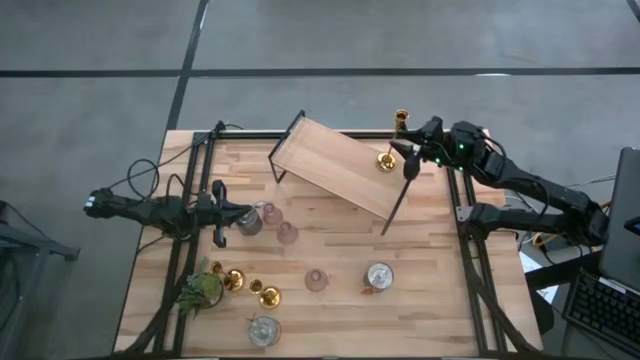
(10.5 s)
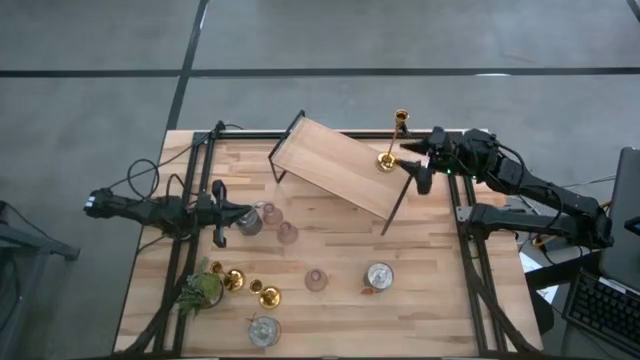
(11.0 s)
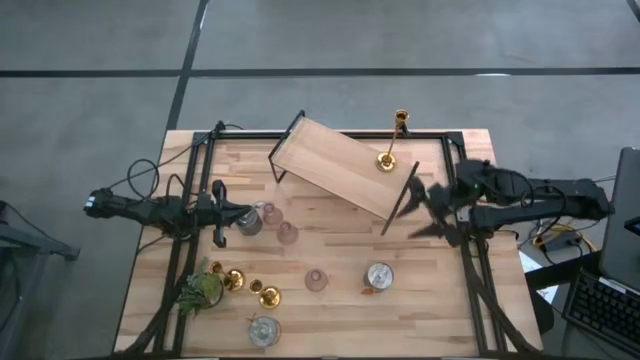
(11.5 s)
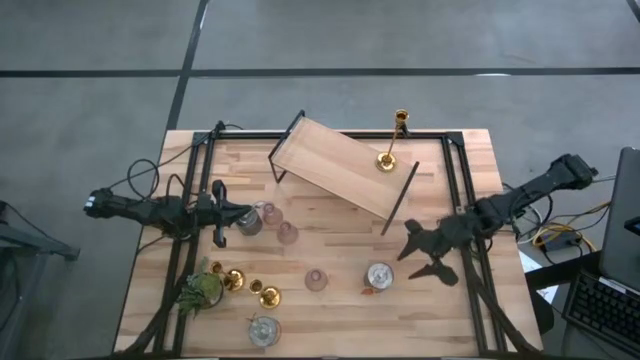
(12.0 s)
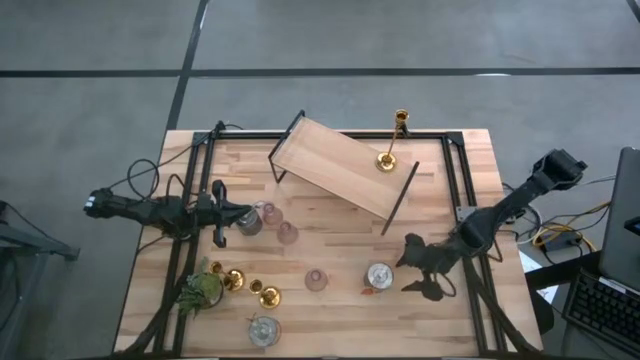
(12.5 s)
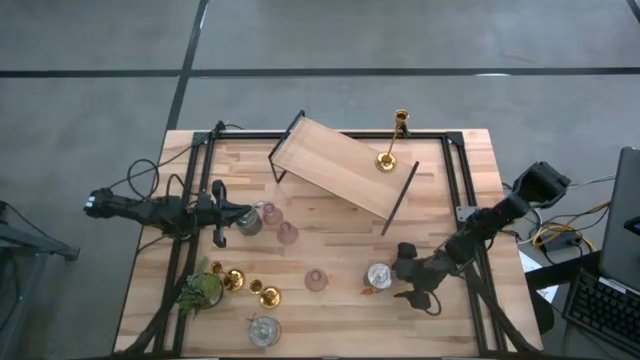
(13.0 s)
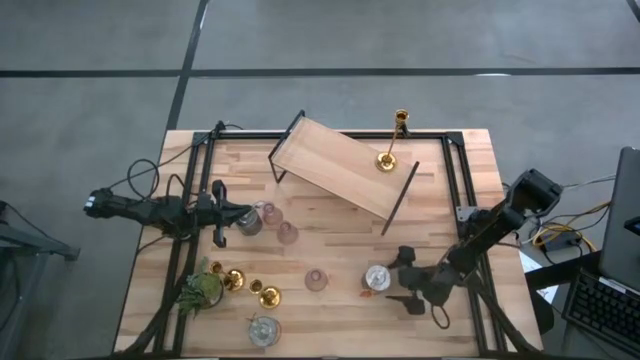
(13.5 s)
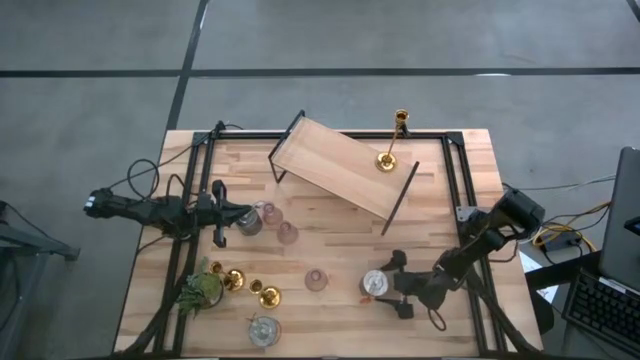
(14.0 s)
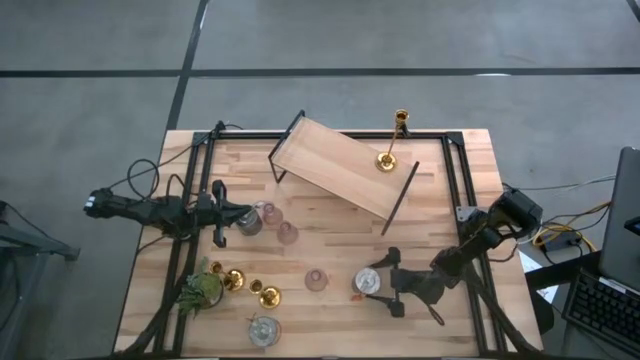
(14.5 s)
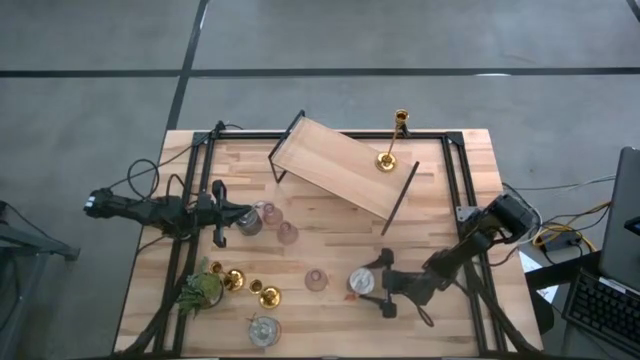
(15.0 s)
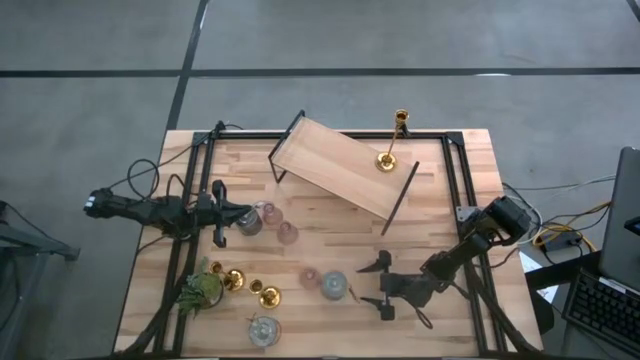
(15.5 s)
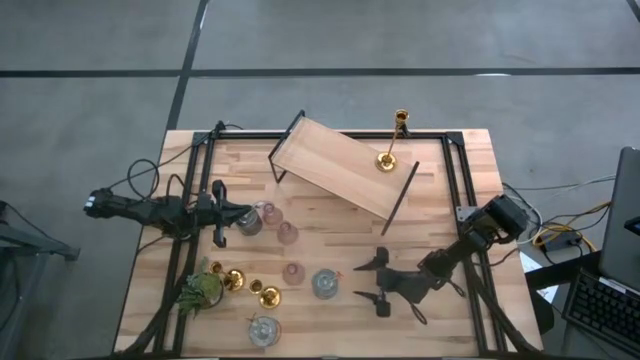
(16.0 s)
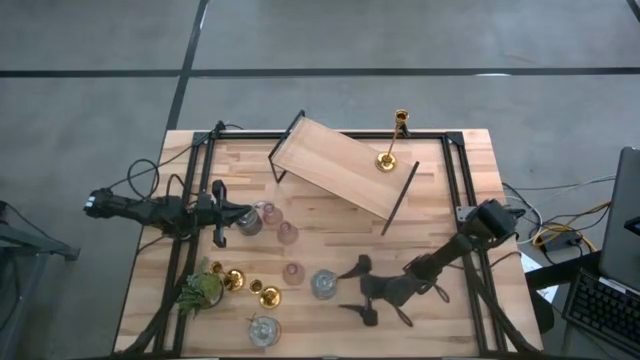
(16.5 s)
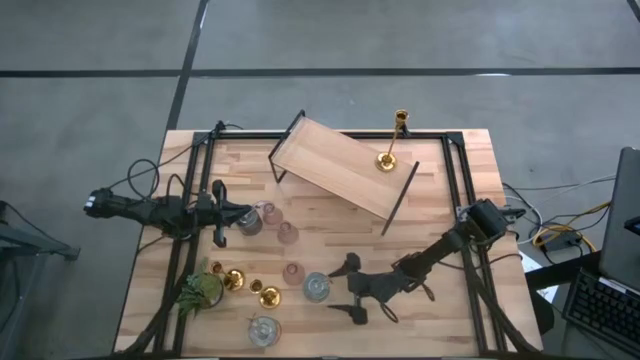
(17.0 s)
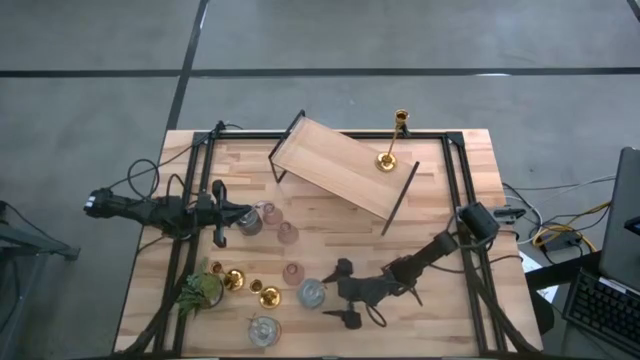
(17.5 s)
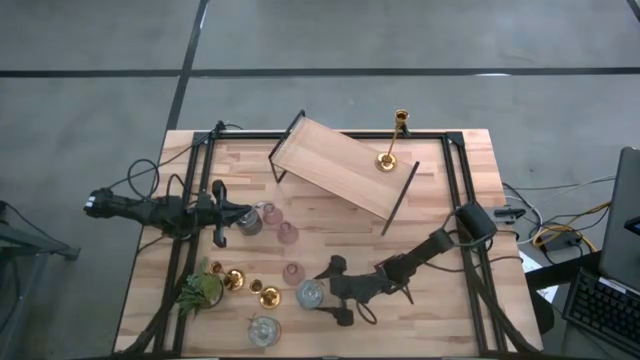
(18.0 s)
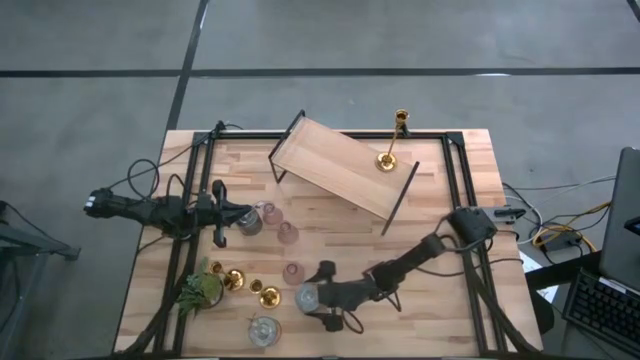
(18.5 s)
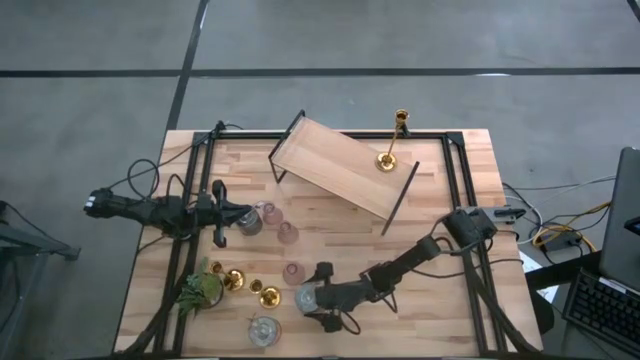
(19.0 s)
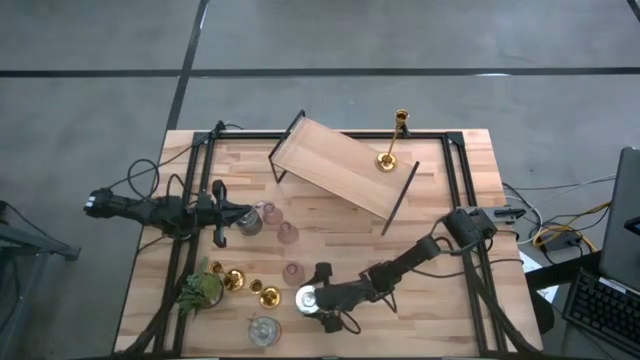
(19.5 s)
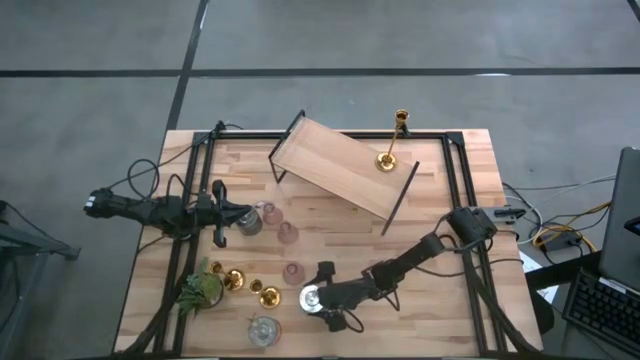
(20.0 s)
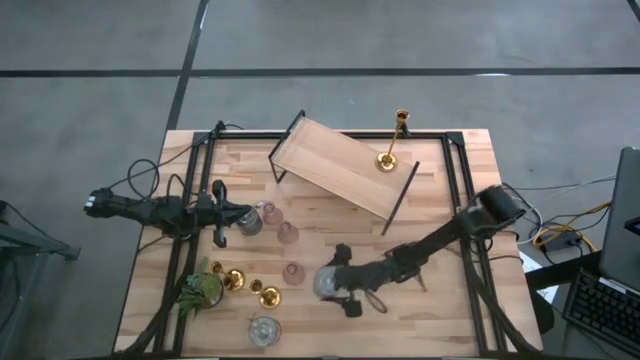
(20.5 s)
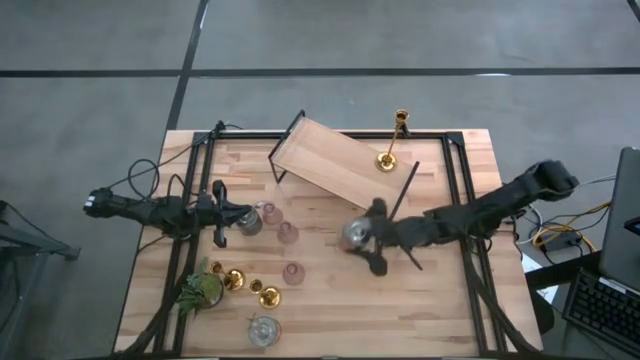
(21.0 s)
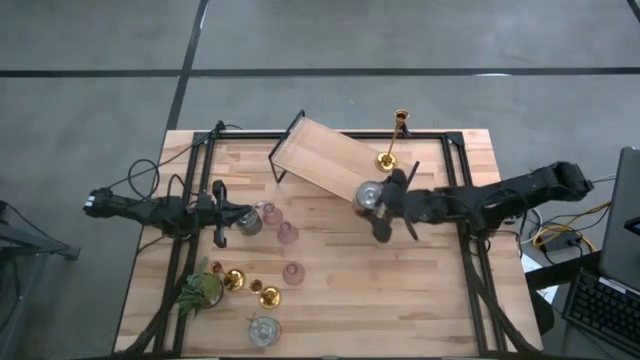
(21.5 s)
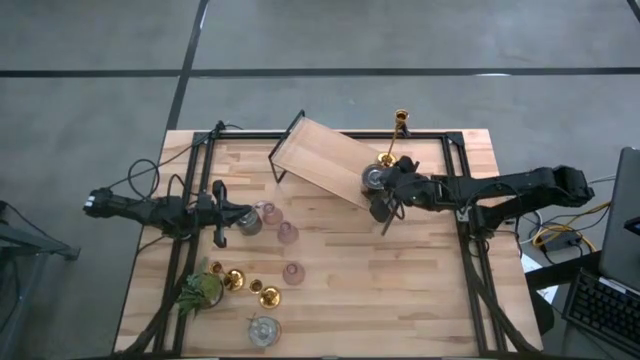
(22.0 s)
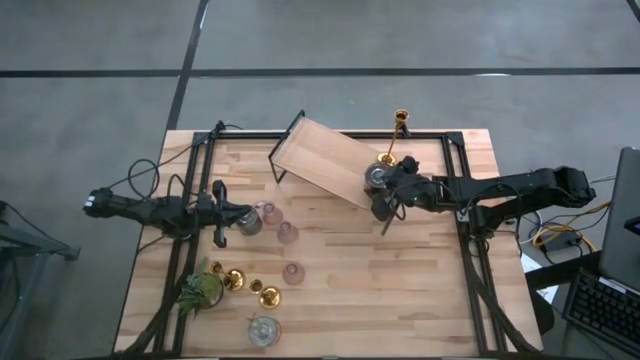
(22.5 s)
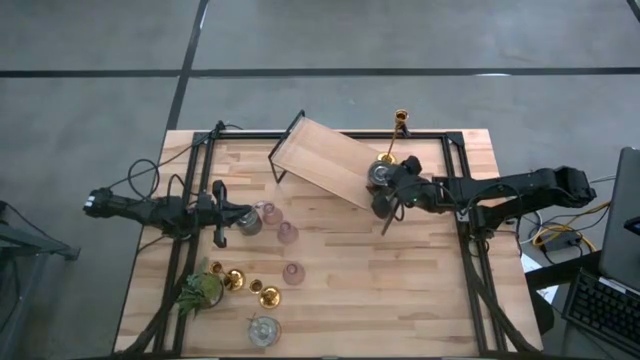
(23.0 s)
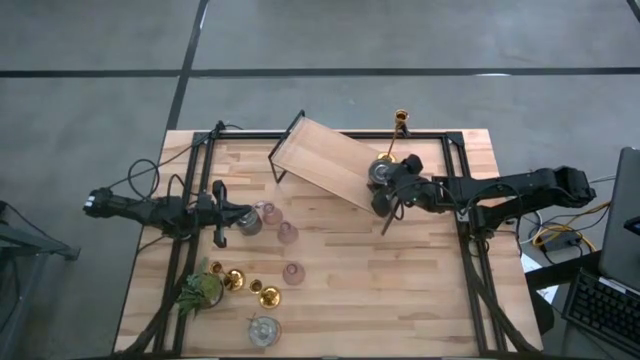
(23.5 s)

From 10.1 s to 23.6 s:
Task: Pick & Place candle stick holders
Put the bottom right silver scented candle on the shelf

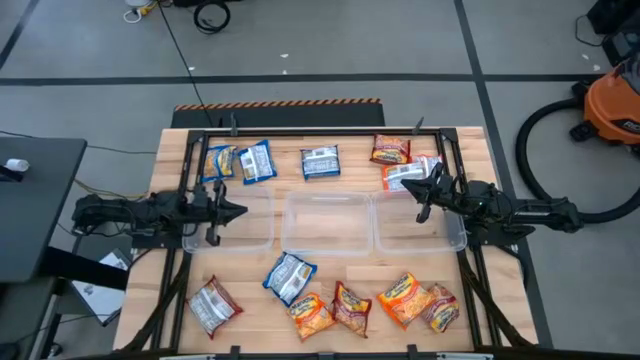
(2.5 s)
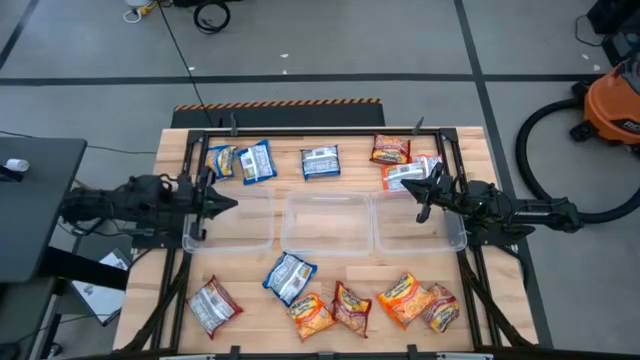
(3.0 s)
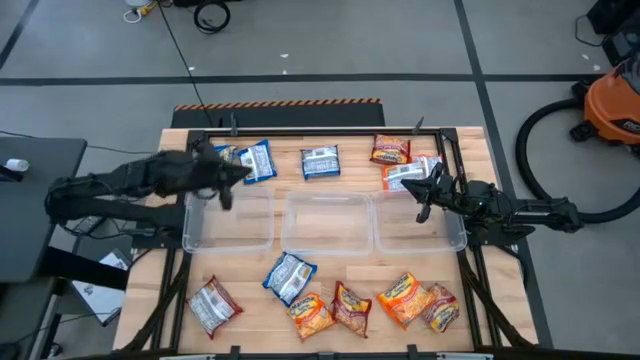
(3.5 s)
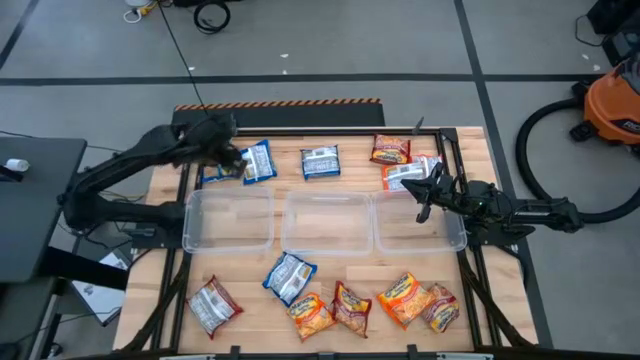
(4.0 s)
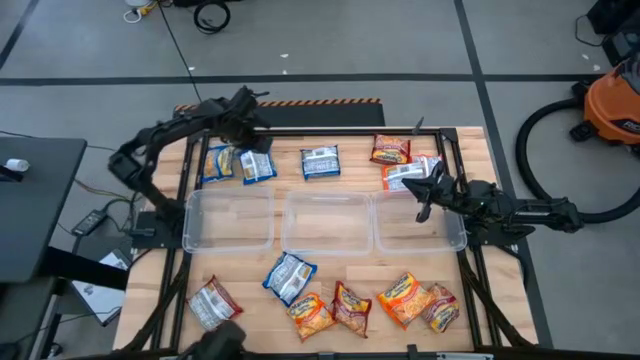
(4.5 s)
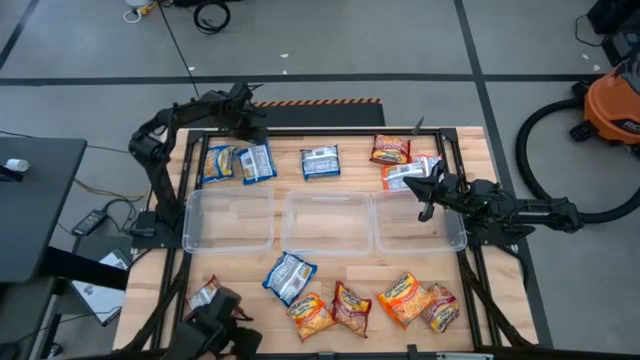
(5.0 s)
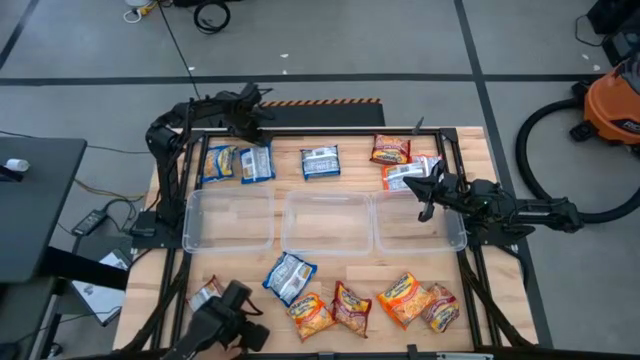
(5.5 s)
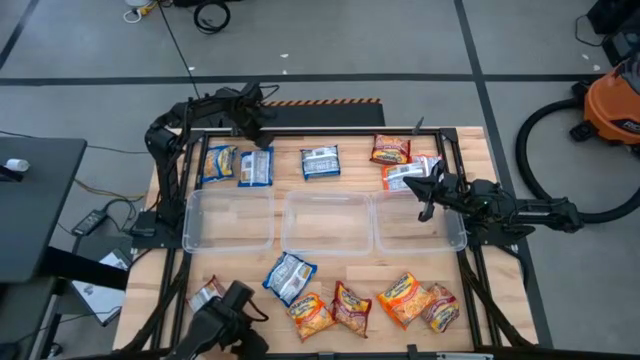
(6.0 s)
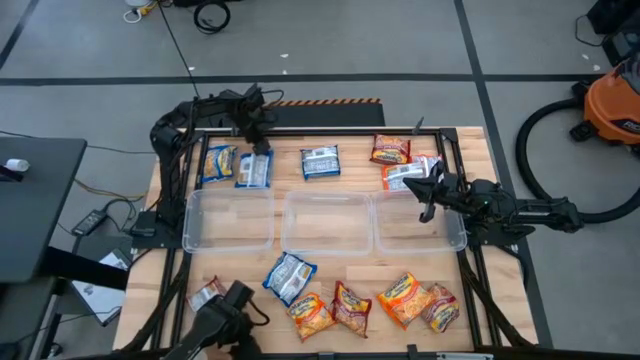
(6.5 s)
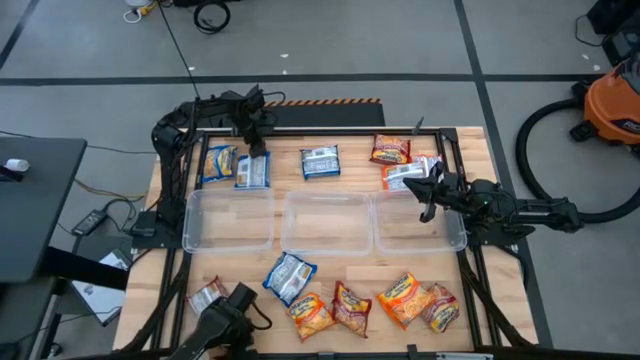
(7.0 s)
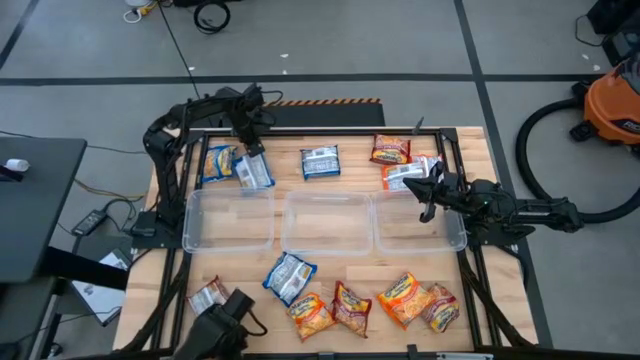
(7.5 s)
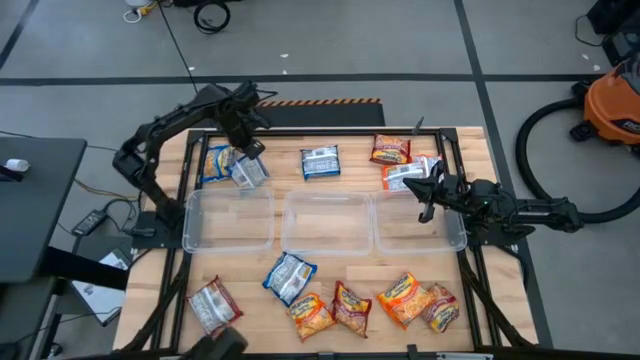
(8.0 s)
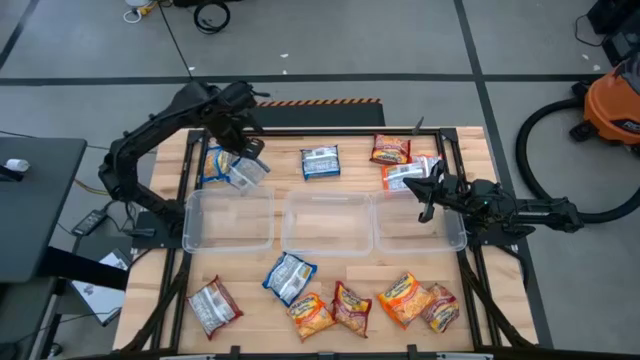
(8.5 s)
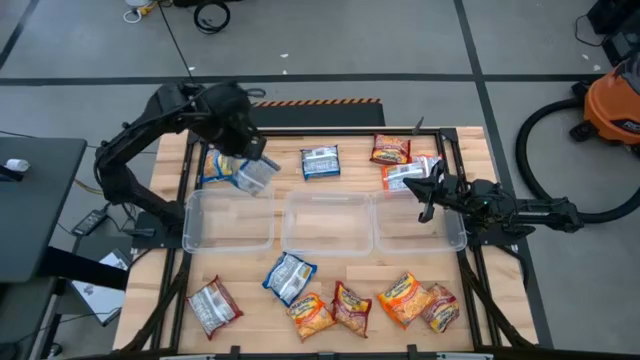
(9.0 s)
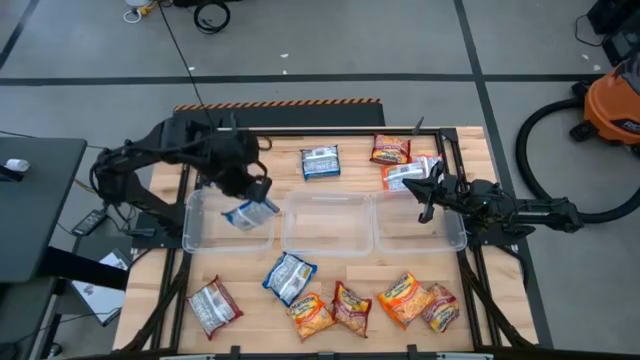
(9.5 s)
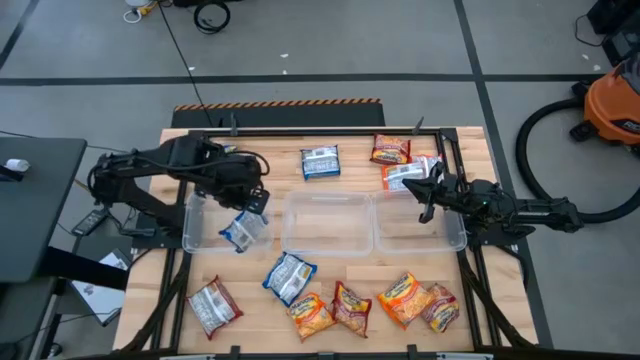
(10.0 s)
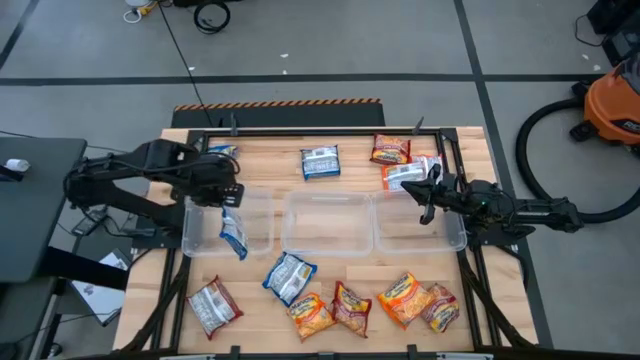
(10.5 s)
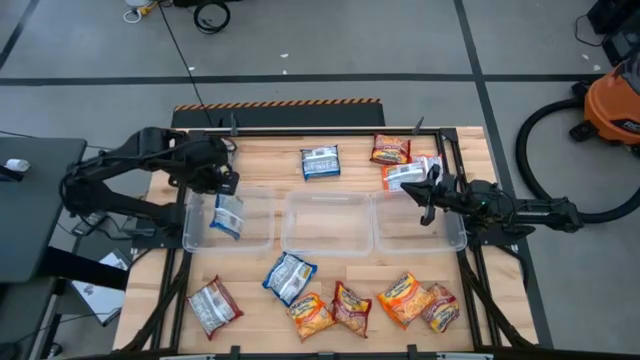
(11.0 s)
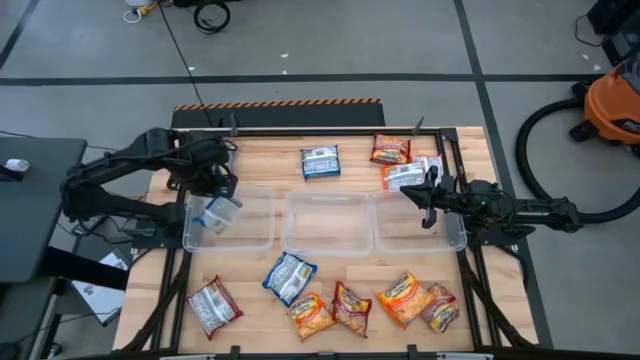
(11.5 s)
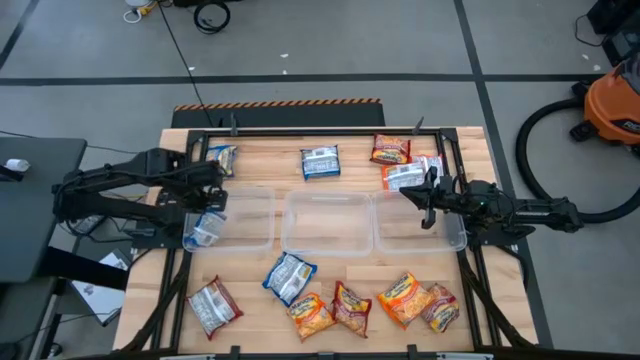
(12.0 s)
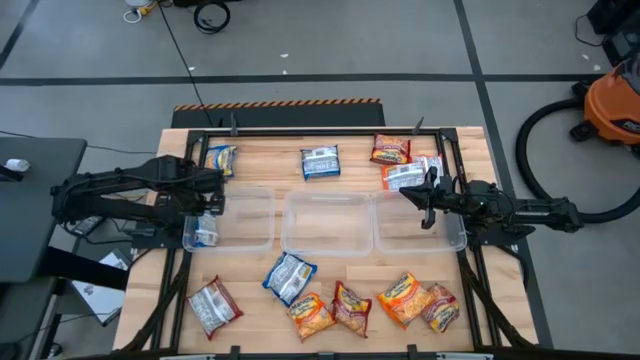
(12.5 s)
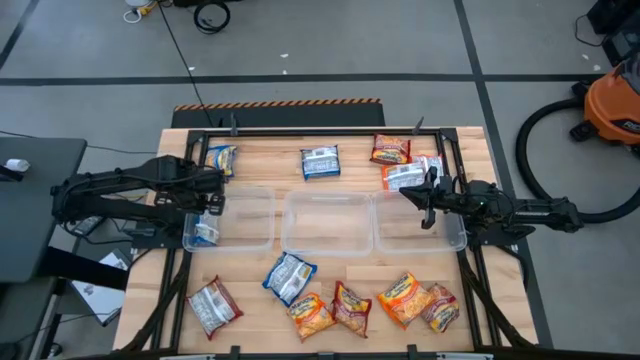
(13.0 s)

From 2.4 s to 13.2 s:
Task: Sort Maruchan noodles
Put the blue noodle pack into the left transparent bin
